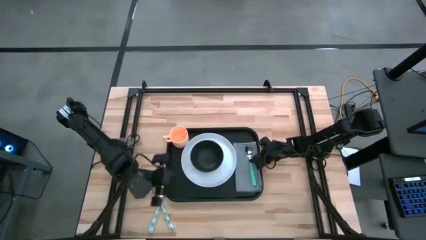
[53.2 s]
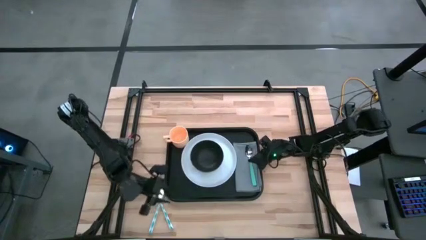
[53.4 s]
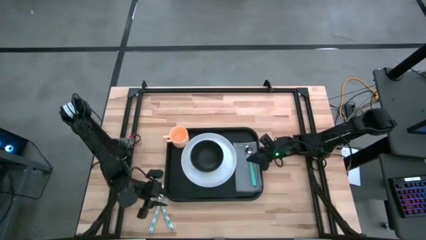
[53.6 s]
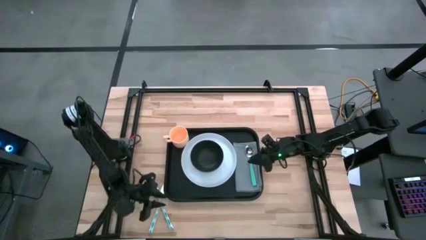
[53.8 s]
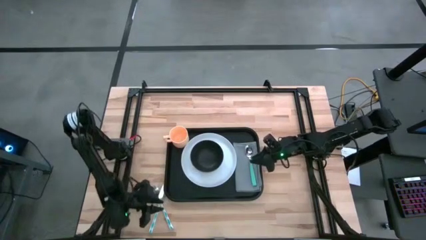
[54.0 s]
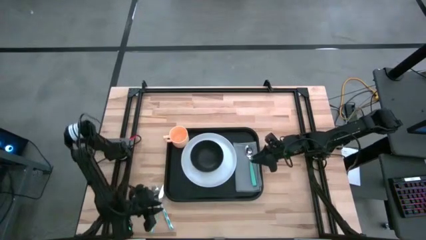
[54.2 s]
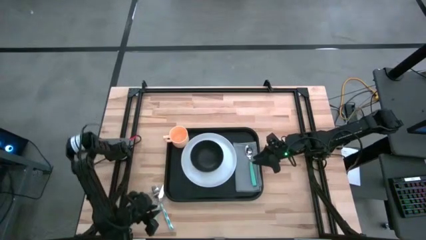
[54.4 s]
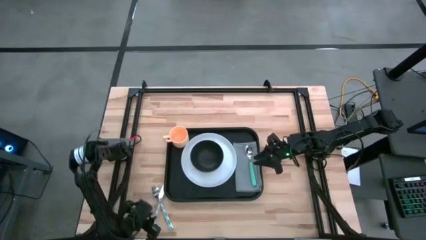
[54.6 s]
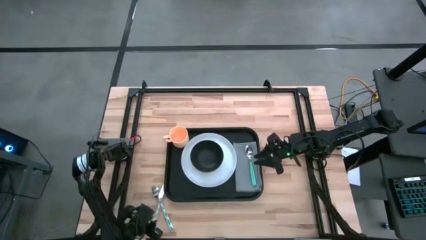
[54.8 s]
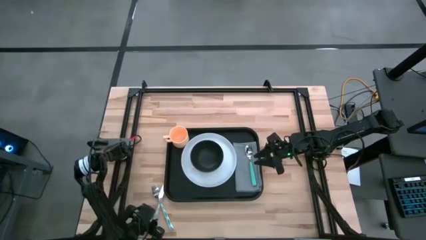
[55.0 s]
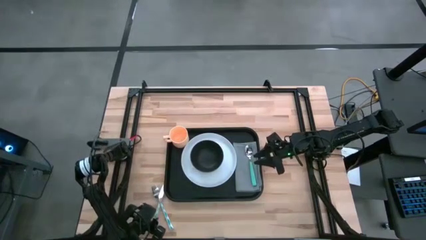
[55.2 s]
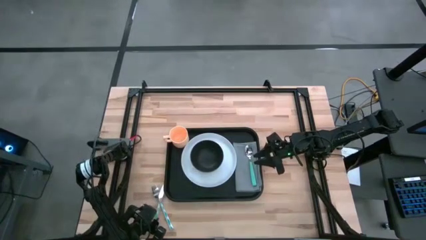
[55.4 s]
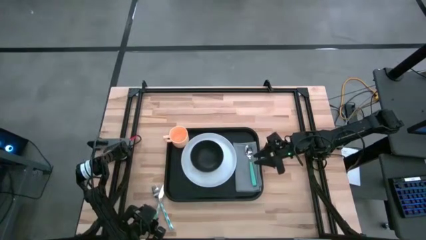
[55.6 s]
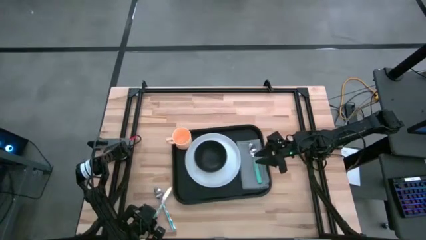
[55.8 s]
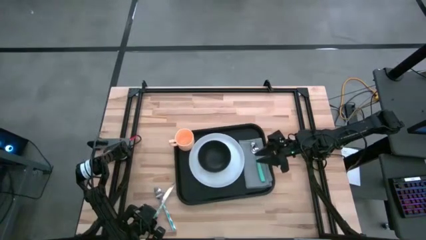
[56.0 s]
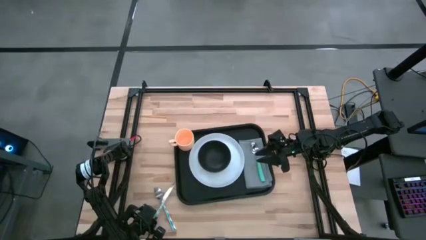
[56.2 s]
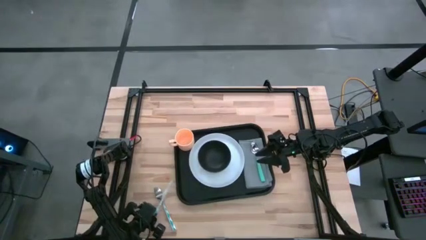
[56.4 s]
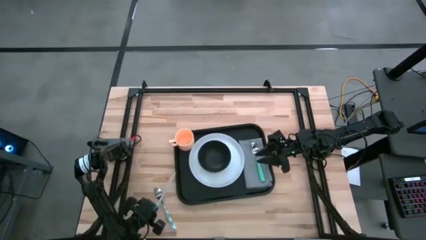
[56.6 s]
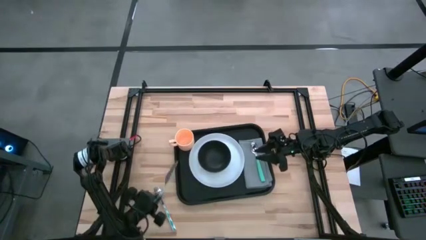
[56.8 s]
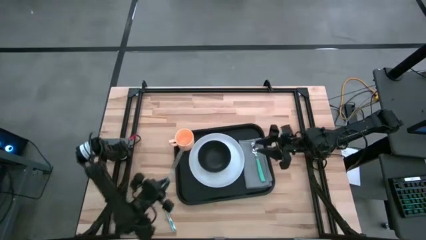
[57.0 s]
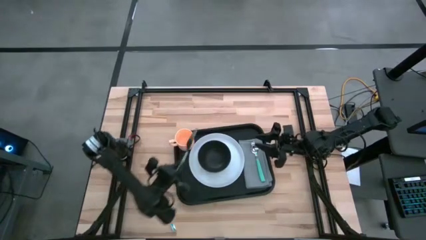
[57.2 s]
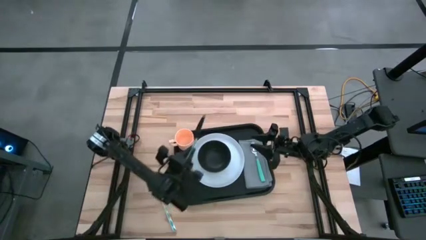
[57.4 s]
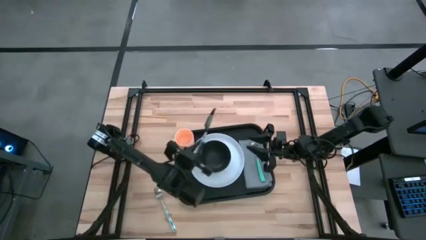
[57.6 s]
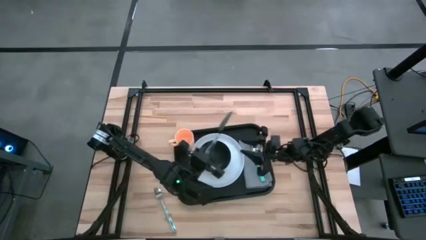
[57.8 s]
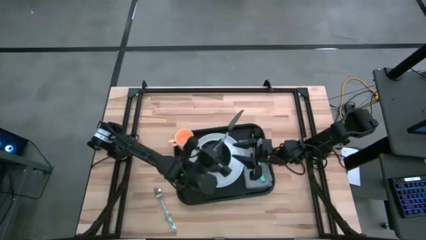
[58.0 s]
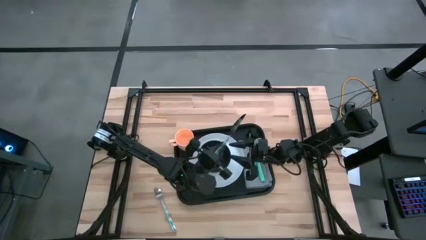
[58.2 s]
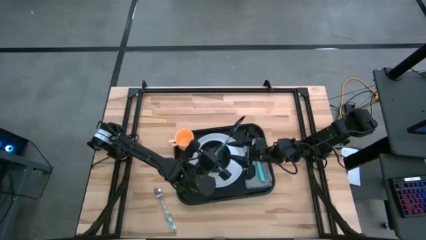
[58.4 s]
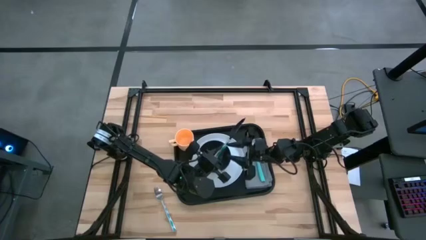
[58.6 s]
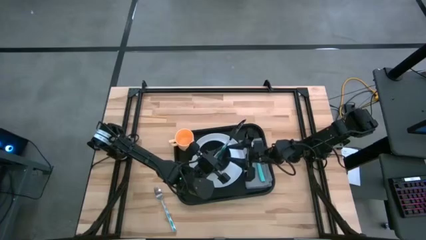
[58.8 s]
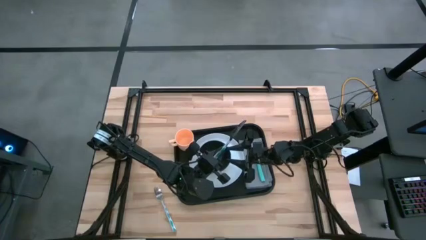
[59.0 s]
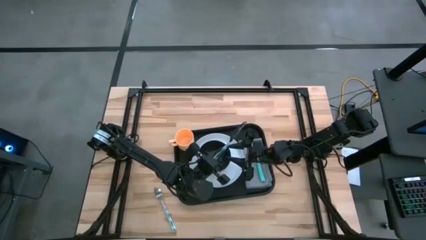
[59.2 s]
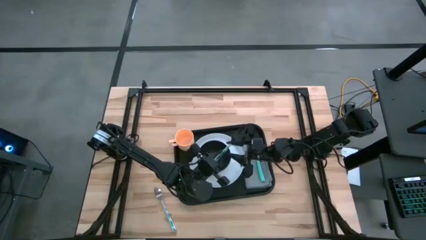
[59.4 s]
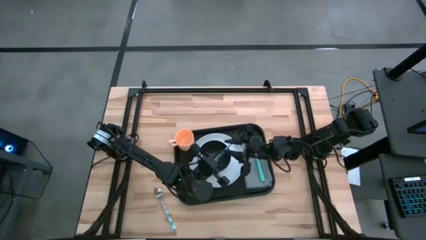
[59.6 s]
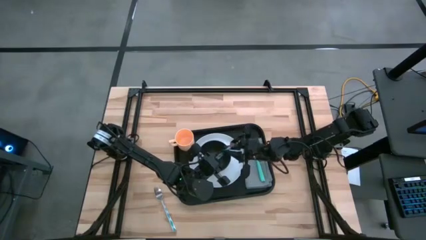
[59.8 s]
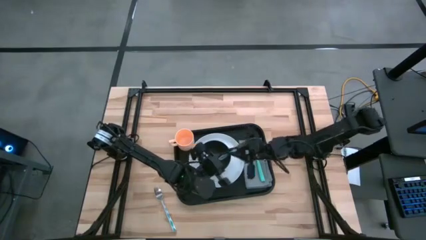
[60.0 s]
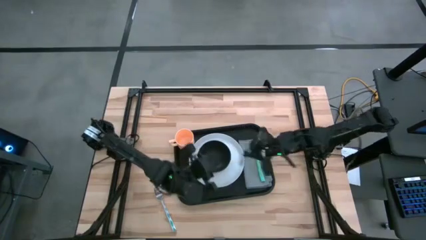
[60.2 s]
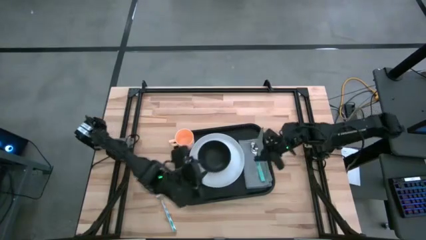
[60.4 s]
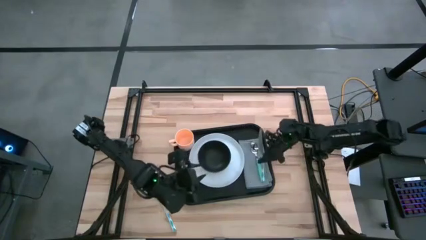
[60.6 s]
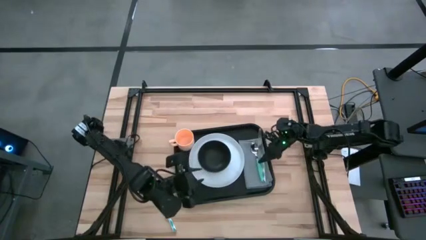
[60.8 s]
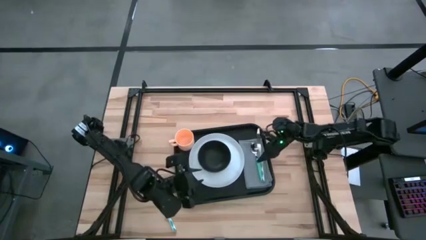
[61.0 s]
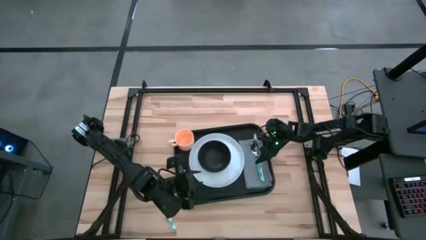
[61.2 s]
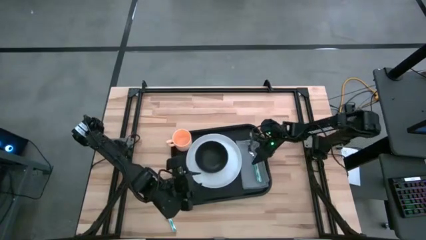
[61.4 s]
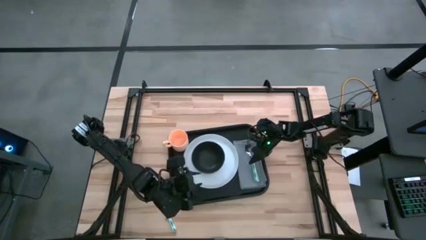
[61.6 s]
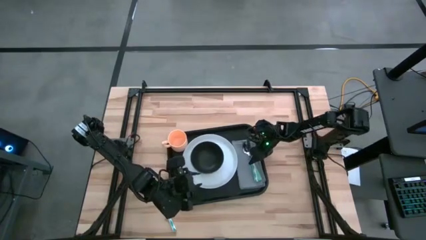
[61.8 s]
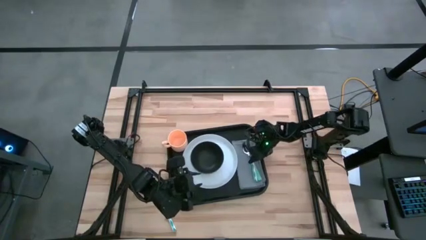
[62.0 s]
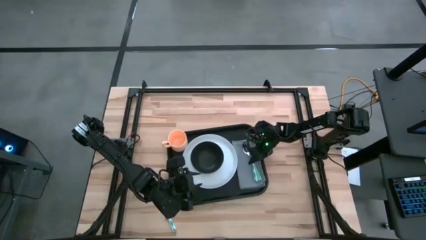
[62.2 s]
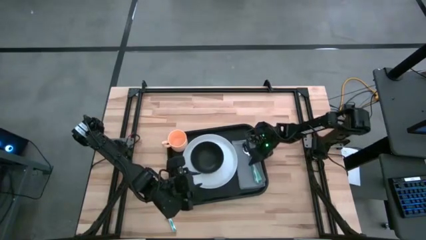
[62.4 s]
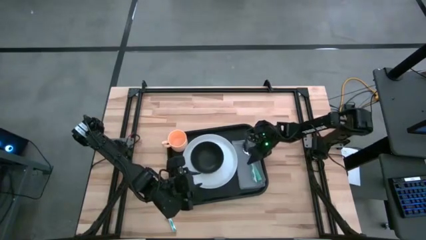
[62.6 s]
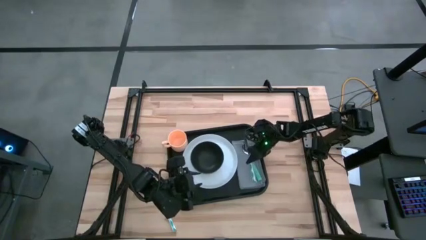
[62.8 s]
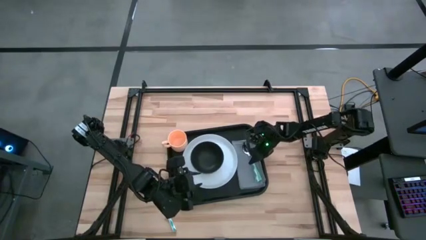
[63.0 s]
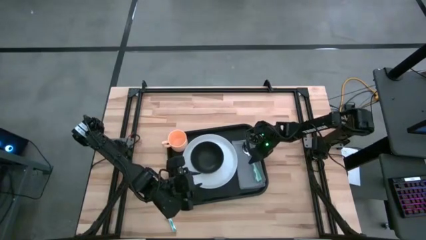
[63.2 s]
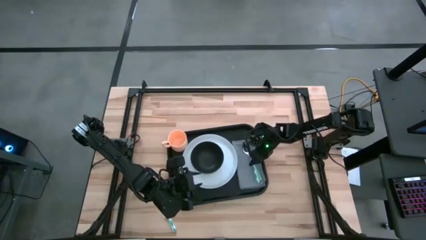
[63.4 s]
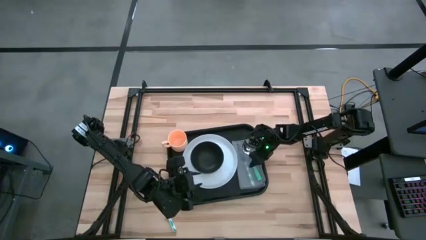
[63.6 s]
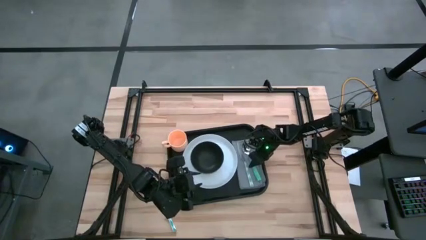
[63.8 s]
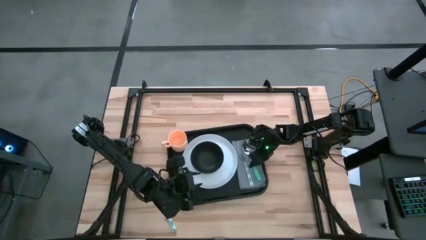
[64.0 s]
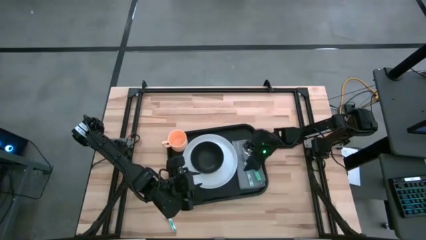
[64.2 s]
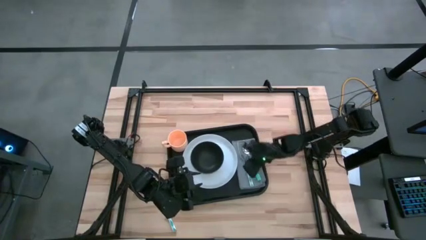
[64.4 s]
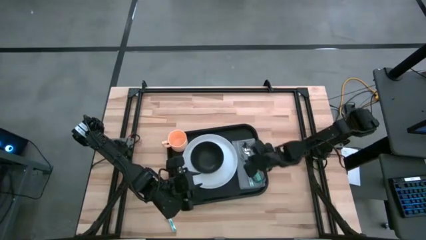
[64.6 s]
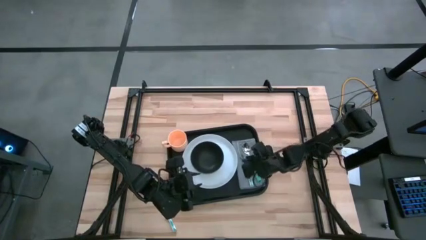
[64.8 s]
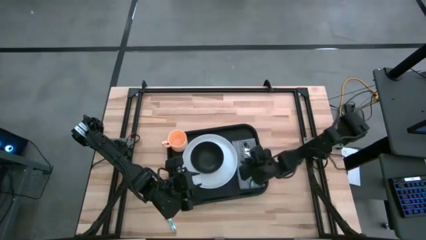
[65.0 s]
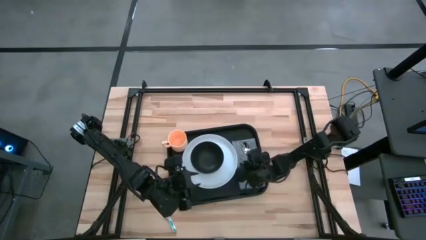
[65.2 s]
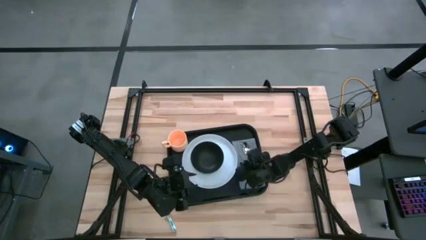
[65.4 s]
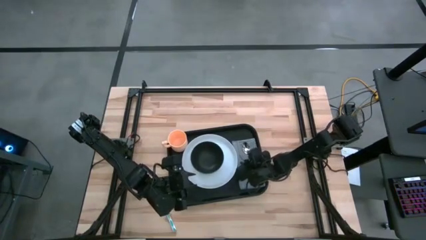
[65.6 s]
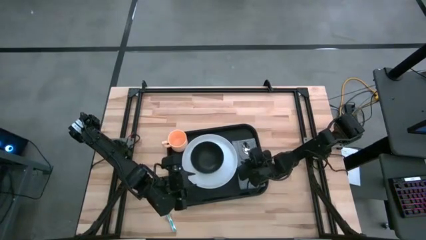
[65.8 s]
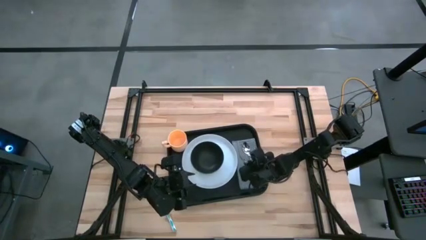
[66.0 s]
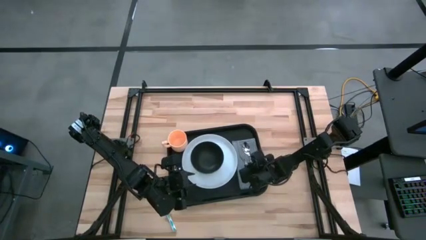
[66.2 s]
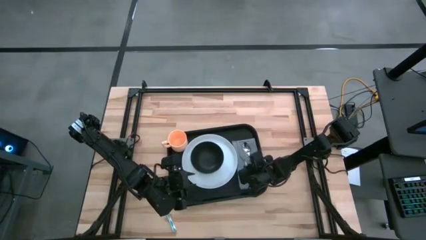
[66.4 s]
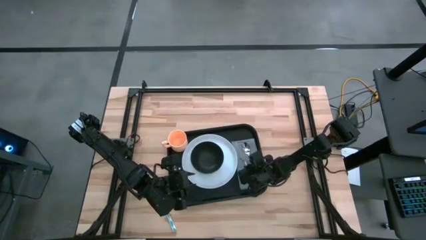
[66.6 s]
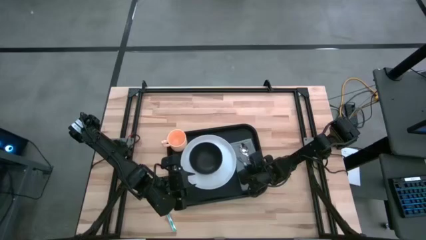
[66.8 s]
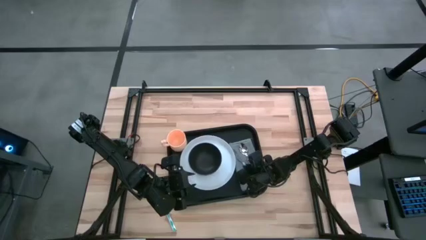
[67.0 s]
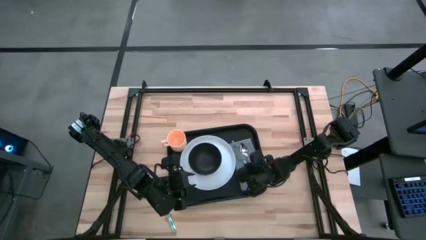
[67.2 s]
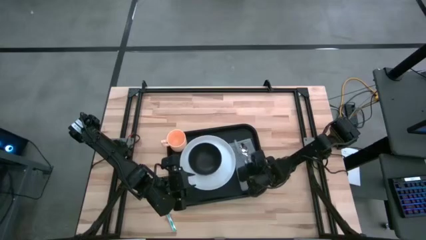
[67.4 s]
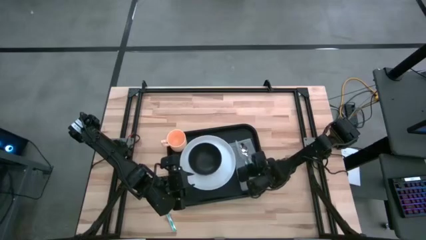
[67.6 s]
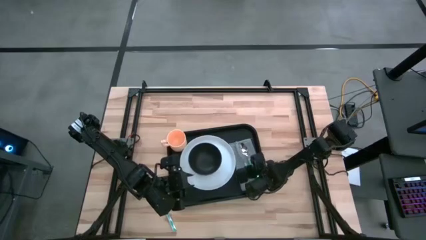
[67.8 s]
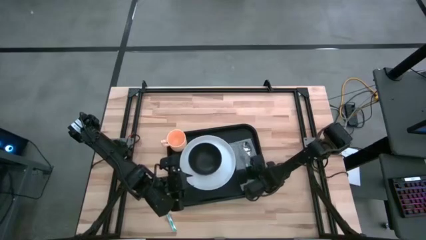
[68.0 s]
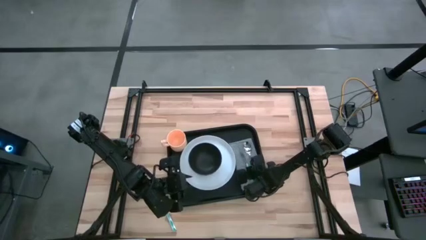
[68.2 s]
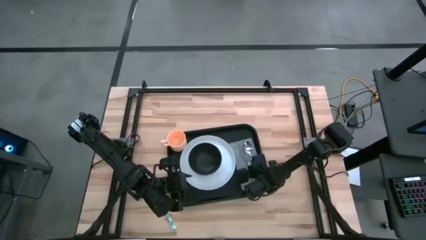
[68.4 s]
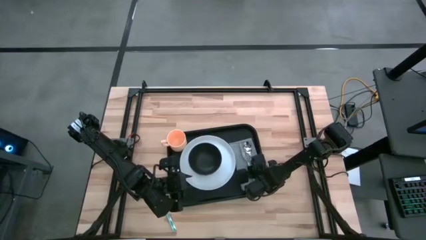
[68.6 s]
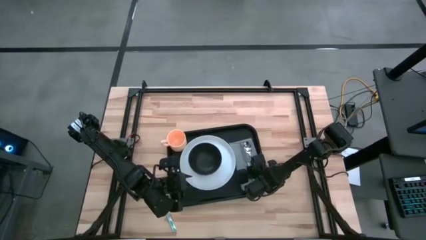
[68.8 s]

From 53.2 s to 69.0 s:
Task: Set up tray
Put the white patterned knife beside the green spoon on the gray napkin on the black serving tray
